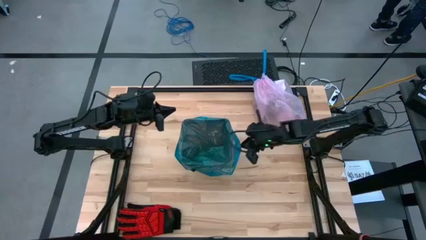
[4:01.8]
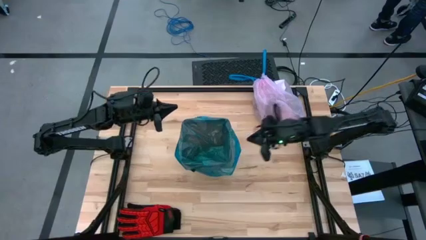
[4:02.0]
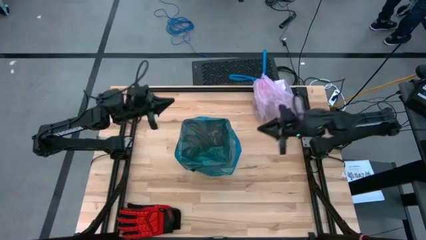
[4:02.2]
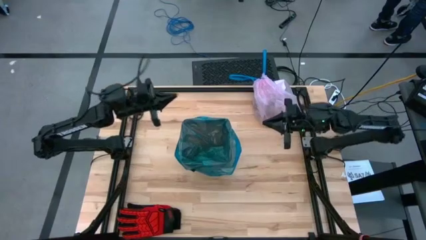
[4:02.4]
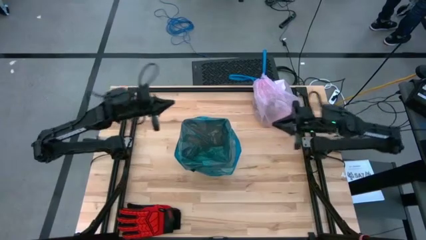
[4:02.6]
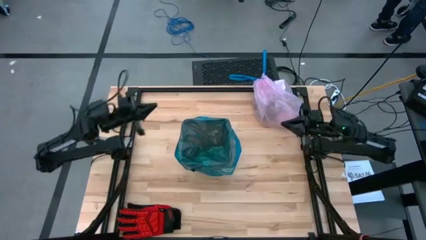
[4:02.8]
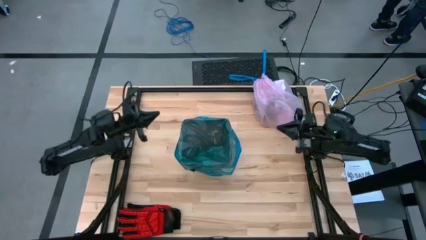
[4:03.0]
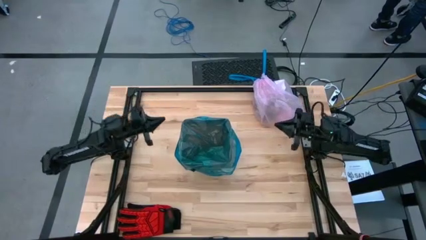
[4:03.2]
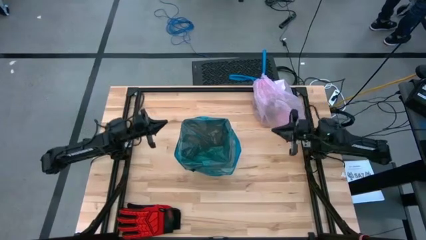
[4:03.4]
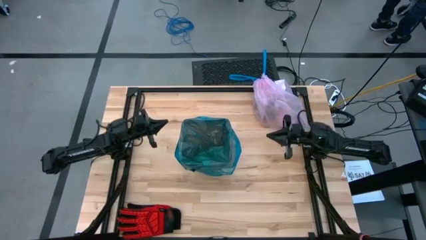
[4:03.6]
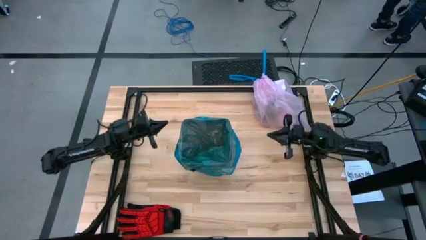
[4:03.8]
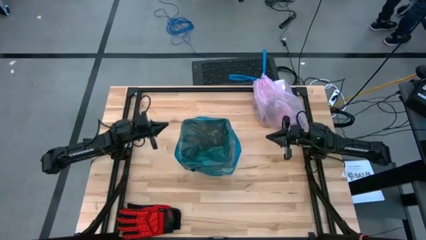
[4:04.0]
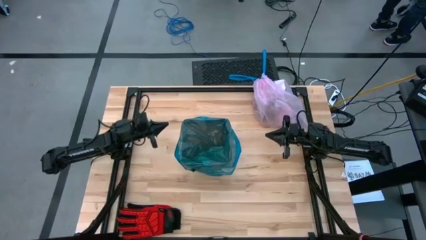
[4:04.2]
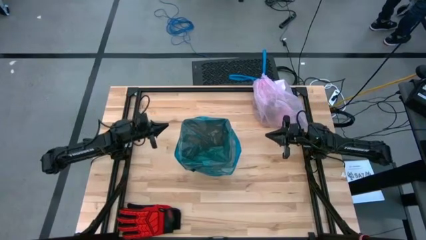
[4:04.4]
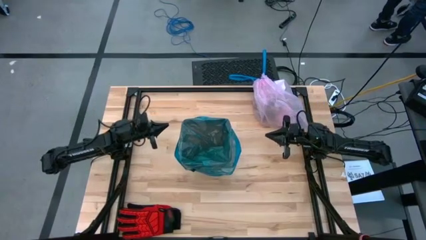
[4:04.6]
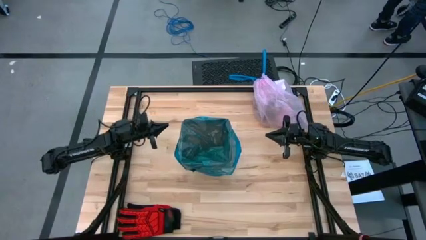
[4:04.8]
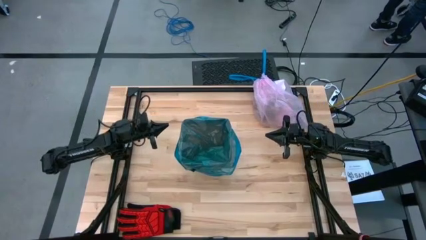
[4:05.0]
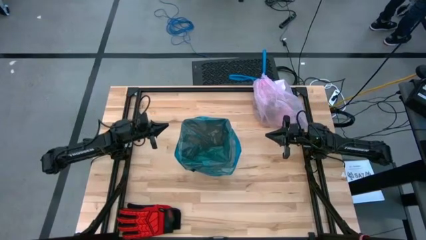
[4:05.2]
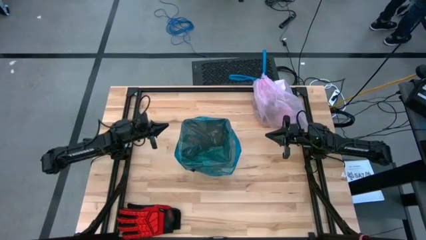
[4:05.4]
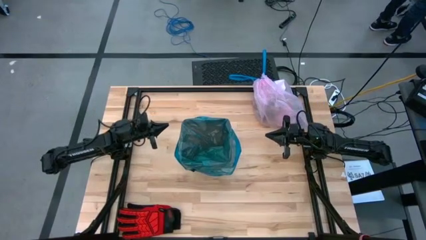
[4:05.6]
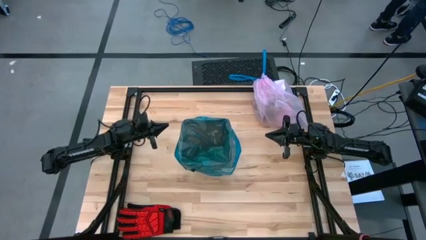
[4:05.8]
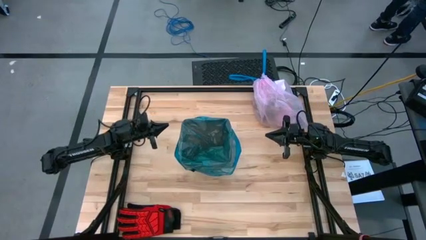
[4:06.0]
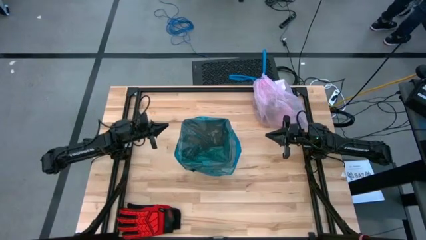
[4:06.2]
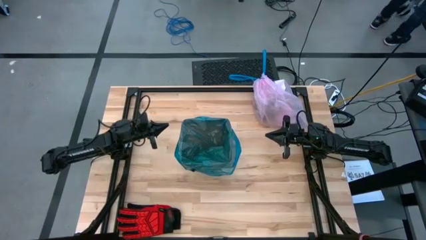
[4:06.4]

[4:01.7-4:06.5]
Task: place trash/remove bag and relplace
Return to Home Position
